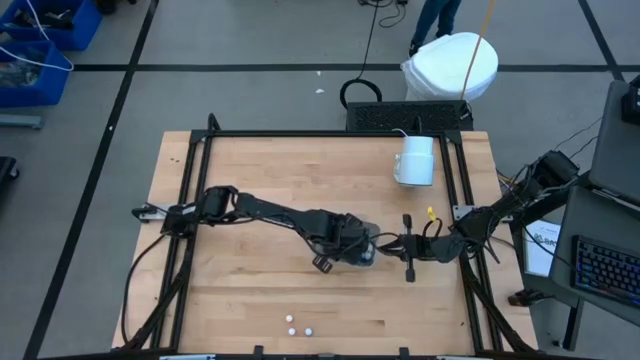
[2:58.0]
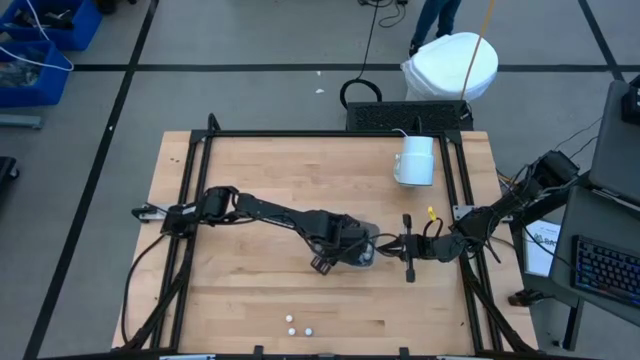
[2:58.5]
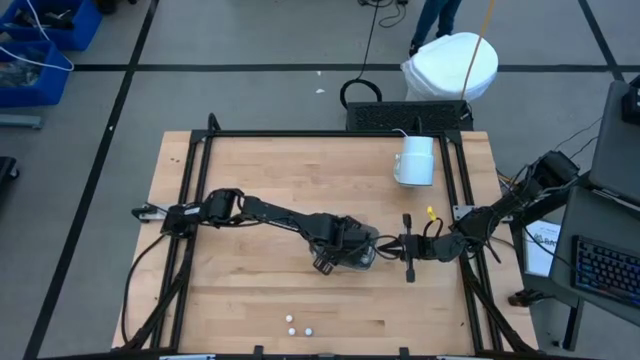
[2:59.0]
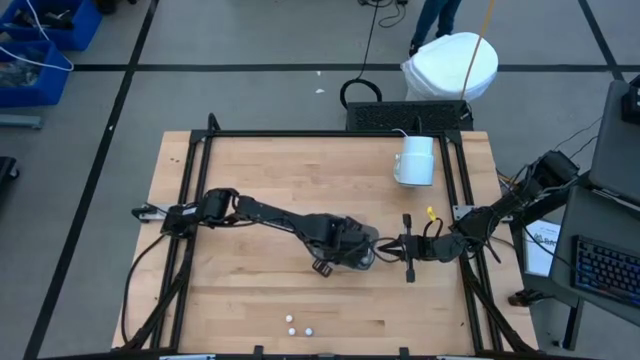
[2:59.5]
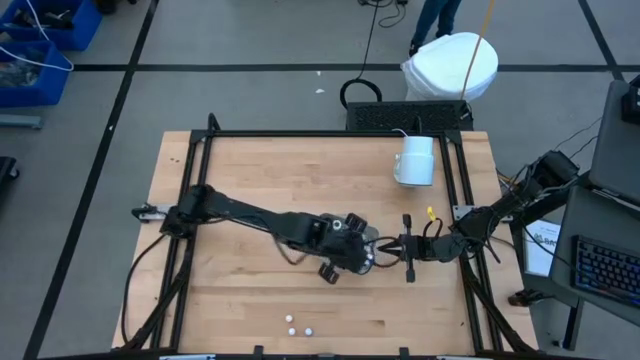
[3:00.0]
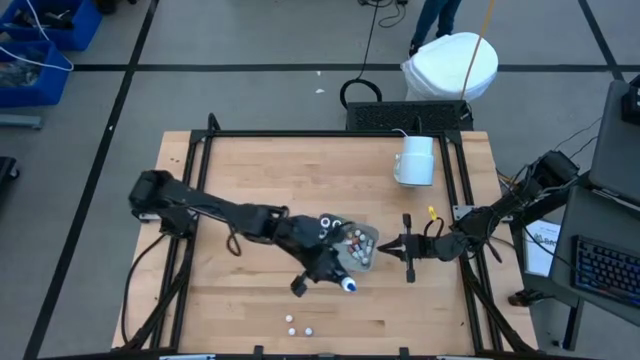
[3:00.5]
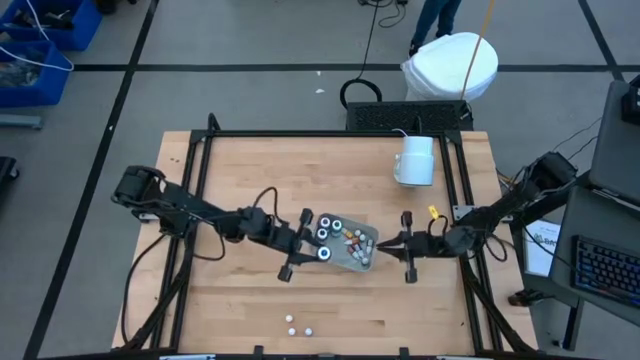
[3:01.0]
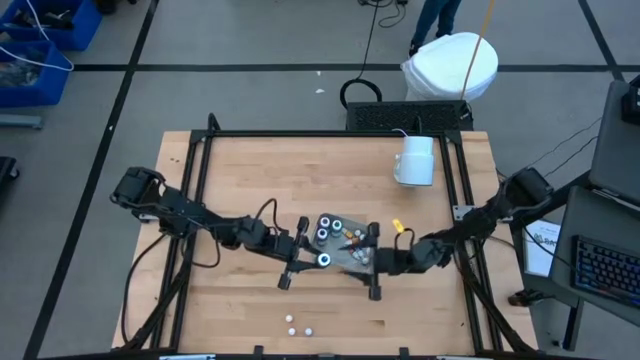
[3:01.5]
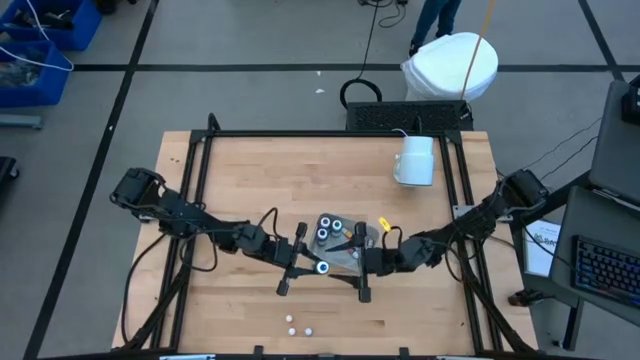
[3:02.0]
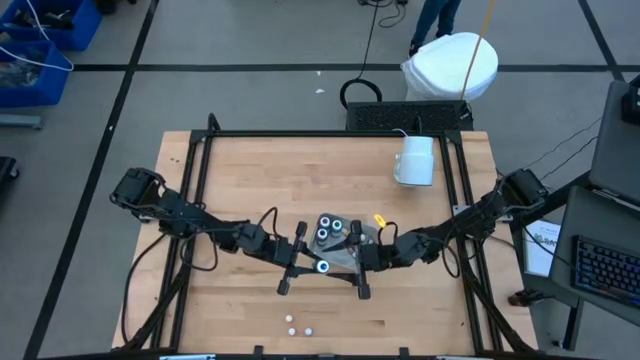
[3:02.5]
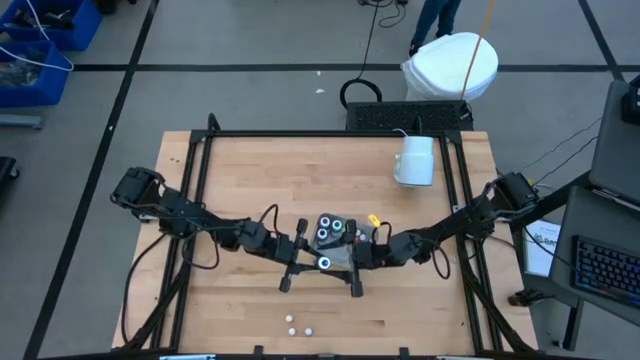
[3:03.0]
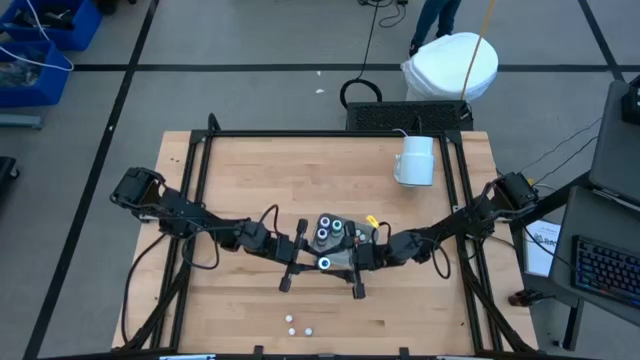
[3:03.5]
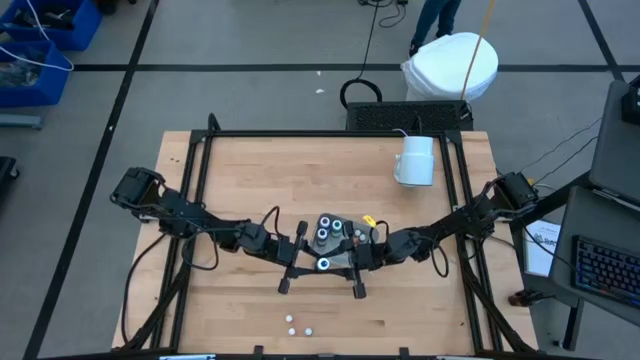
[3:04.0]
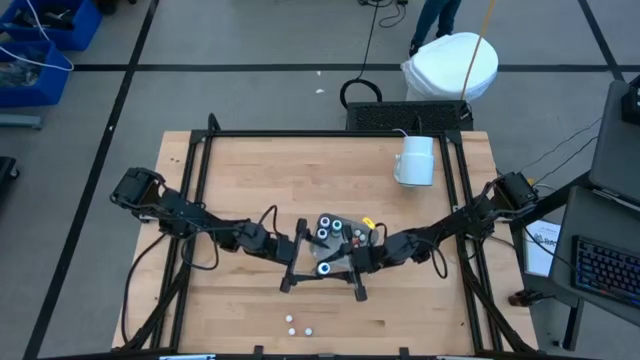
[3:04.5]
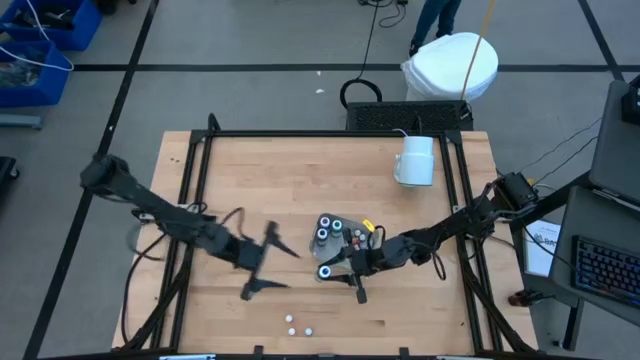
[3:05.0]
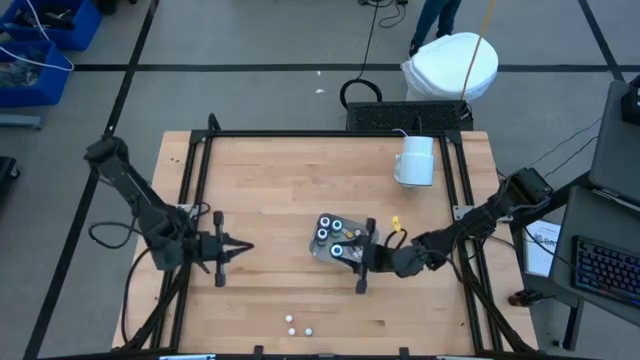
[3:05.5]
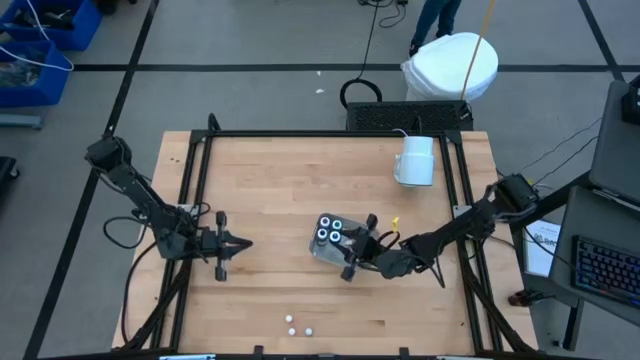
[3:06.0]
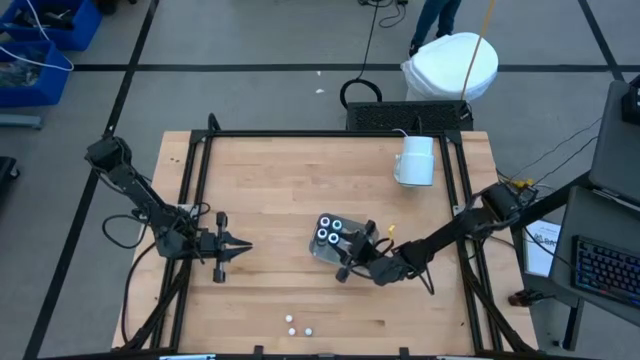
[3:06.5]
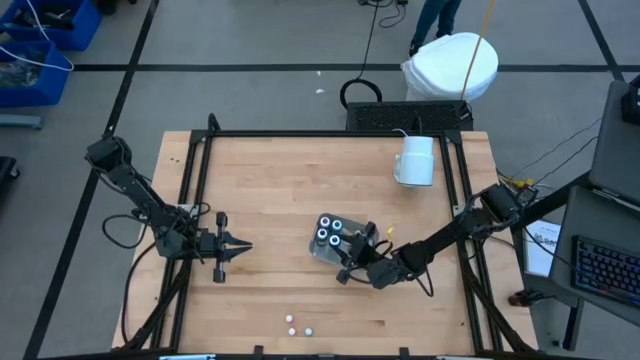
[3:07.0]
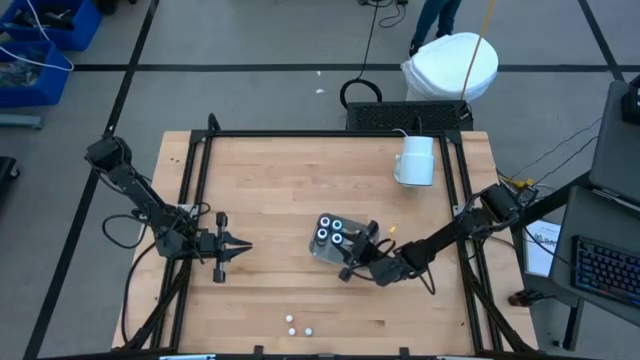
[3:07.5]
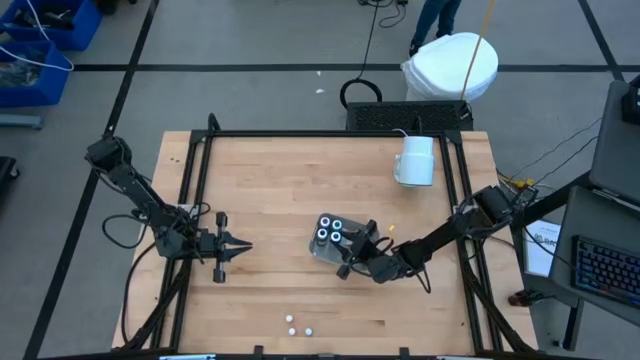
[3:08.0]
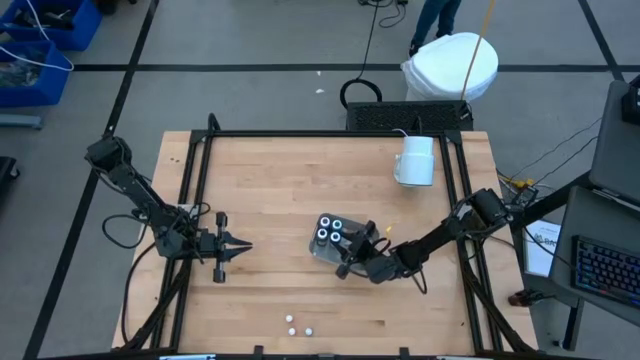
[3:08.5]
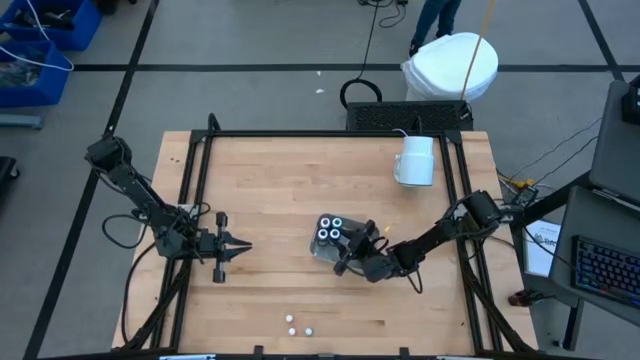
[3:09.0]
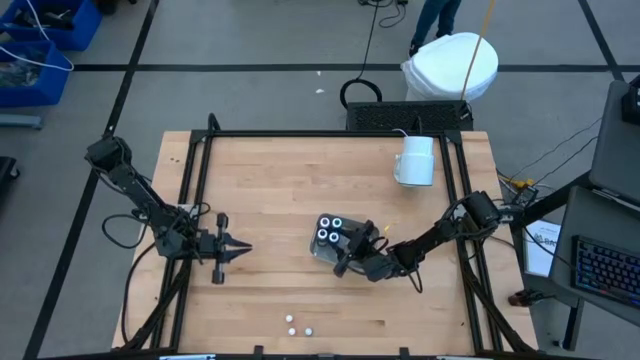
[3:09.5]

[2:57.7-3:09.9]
Task: Pick & Place food coloring
Adjust the big blue food coloring in the gray bin

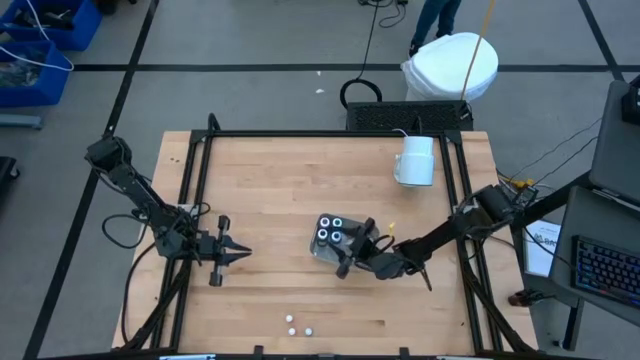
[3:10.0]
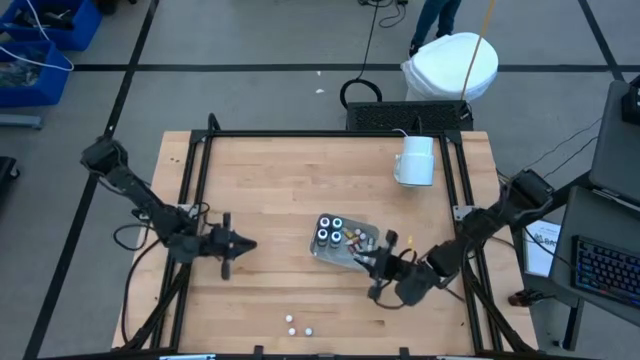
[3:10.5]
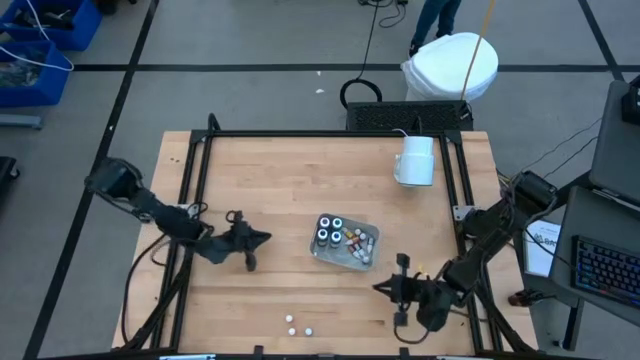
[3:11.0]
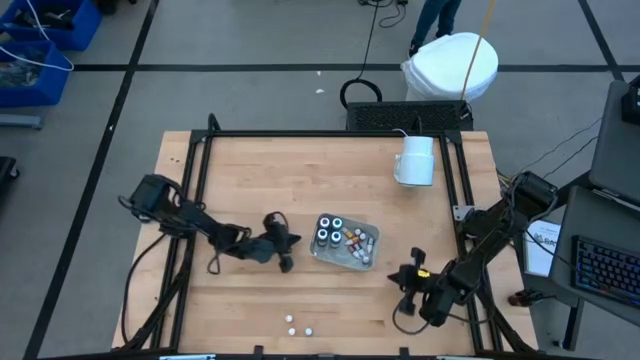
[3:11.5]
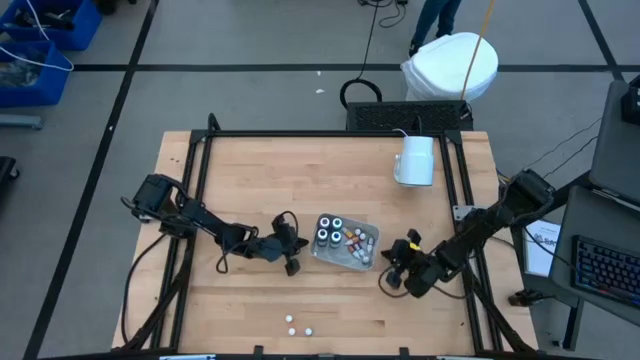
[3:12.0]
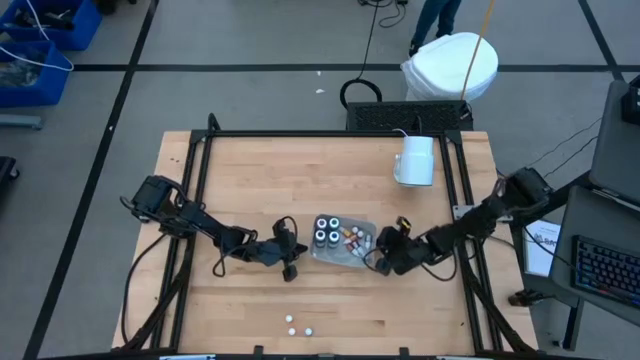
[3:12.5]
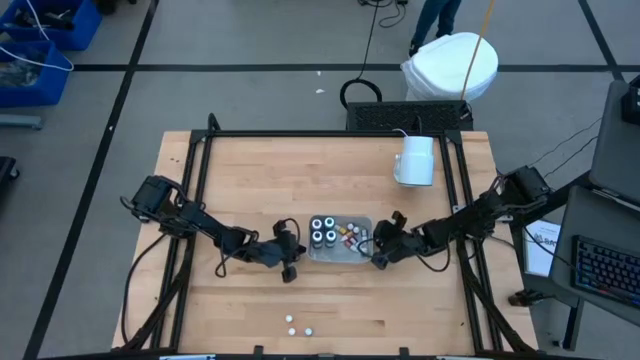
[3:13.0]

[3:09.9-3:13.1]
Adjust the gray bin

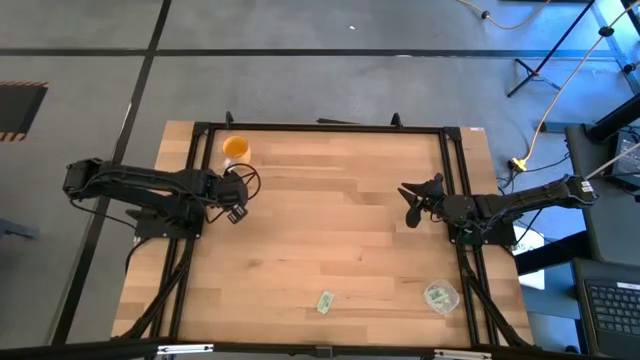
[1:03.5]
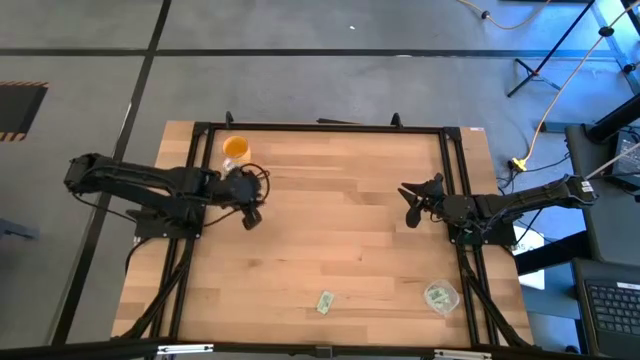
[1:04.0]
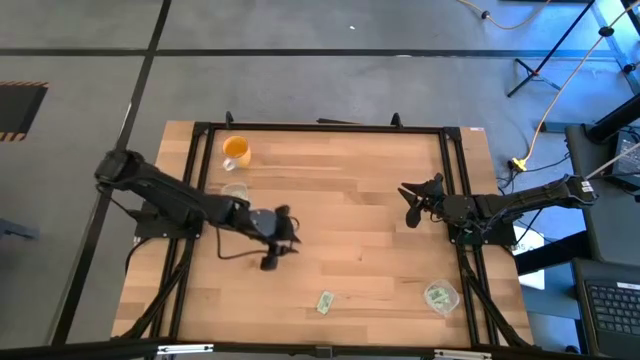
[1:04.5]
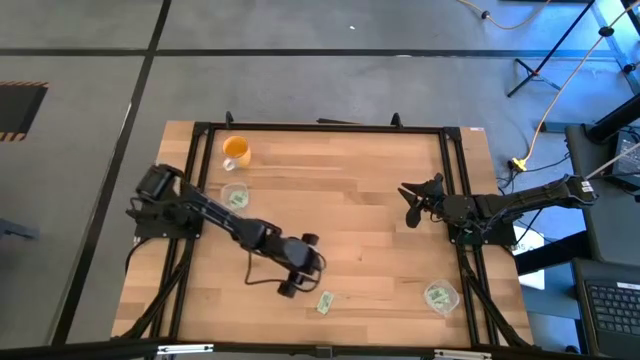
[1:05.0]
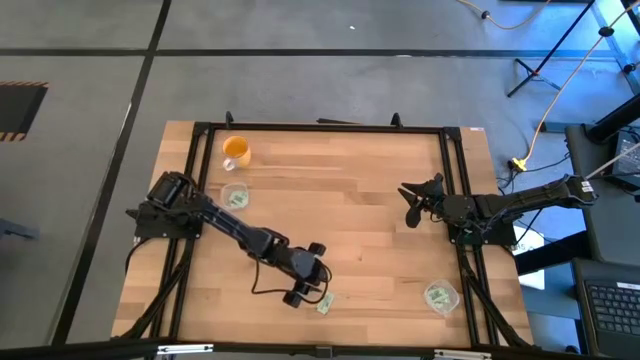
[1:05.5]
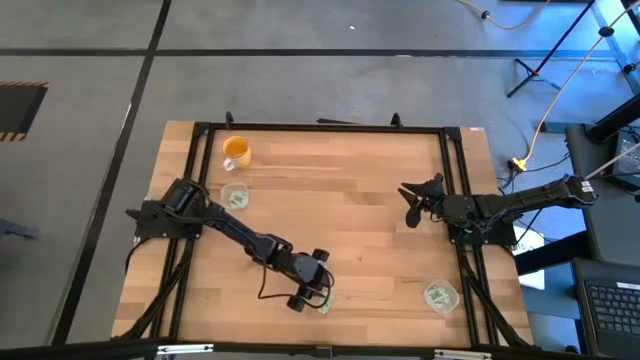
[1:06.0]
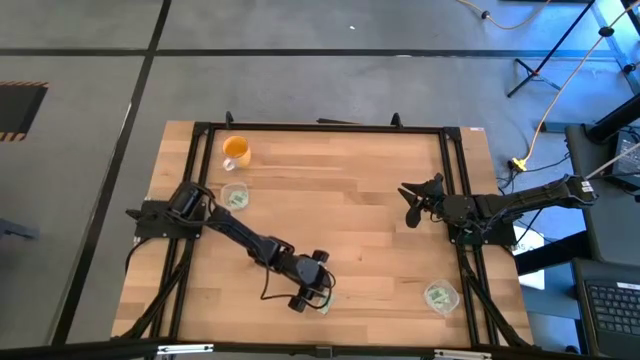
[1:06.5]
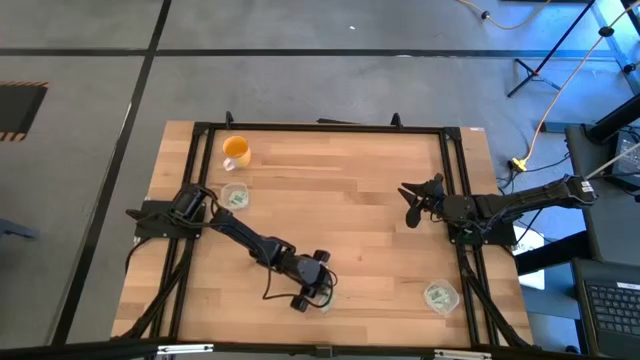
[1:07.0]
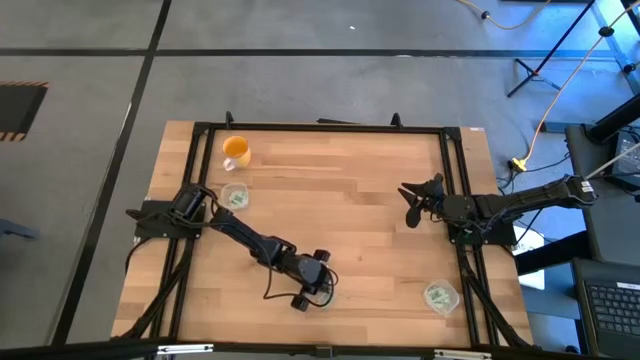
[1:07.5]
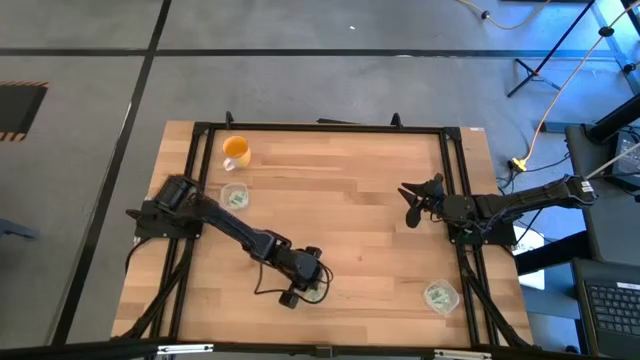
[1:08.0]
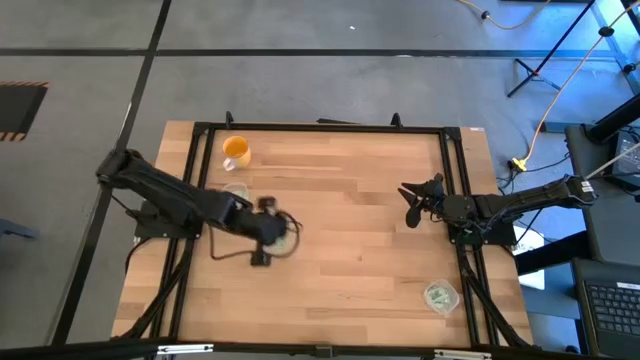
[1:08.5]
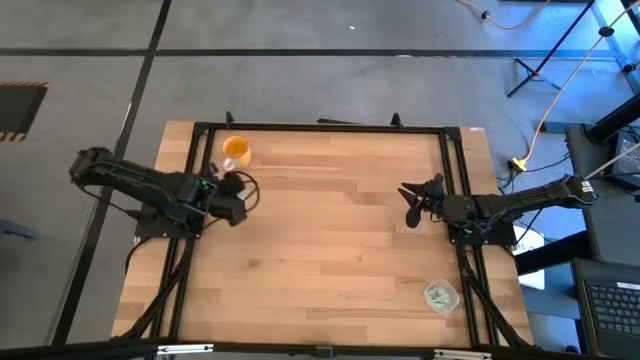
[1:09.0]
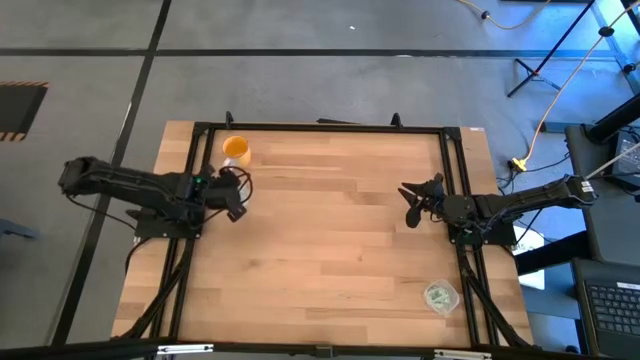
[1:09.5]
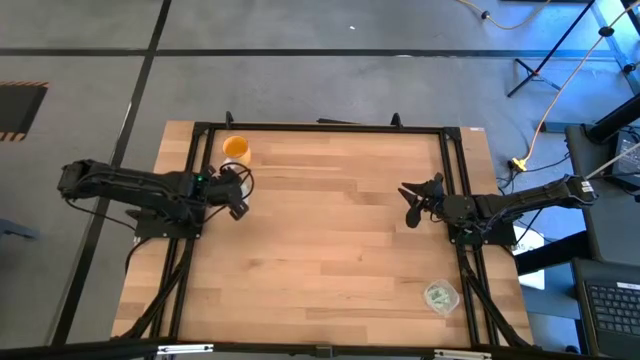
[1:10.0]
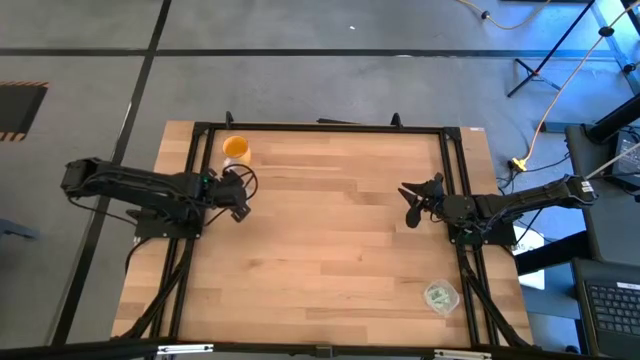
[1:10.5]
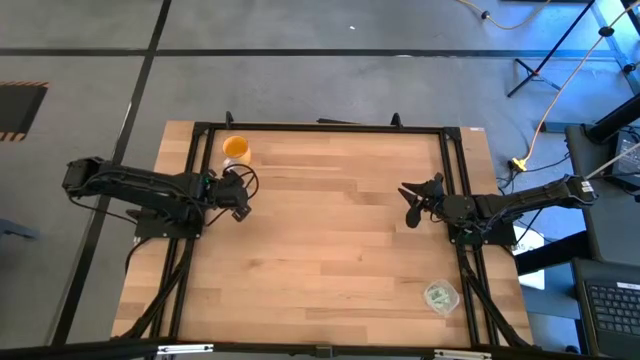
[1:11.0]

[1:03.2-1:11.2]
Task: Pick and place items into bin
Put the green stevia packet into the top transparent bin
